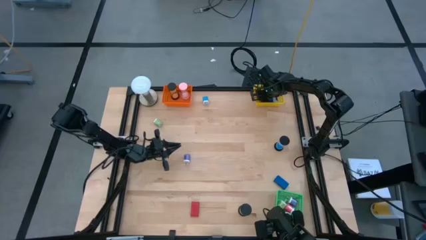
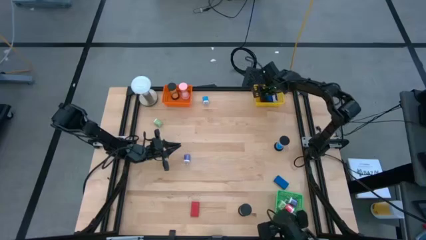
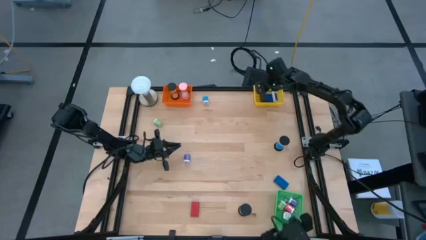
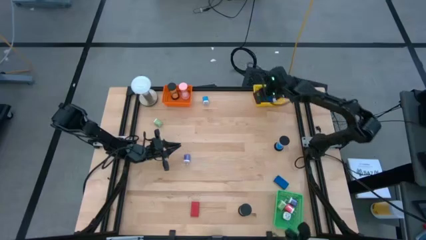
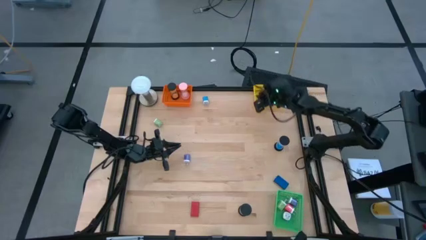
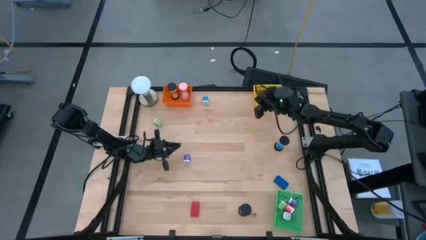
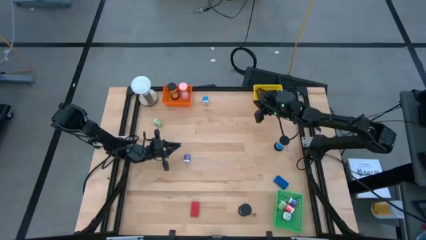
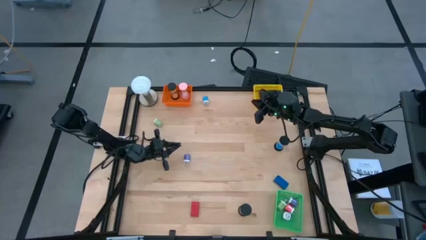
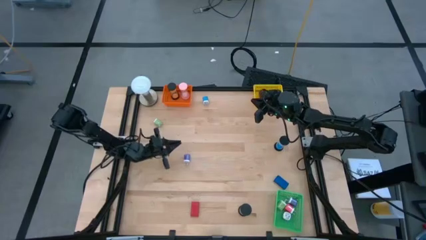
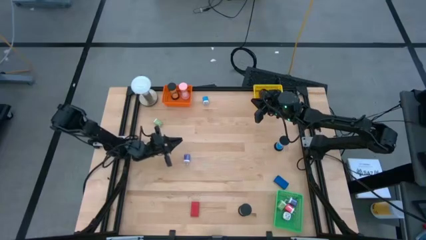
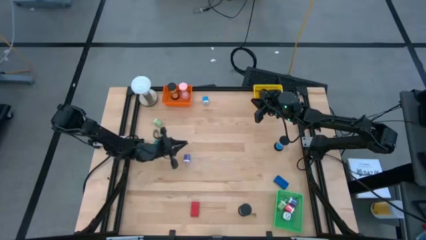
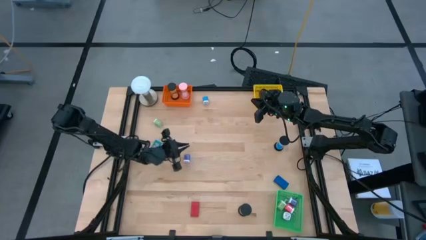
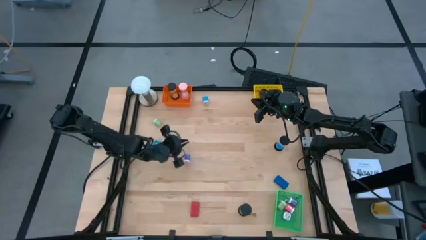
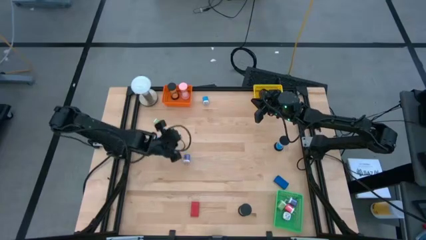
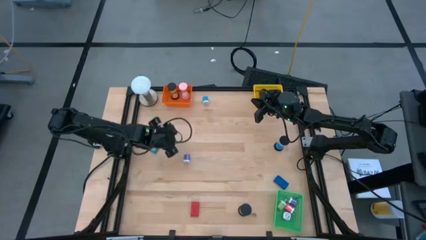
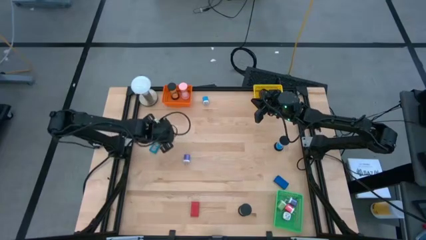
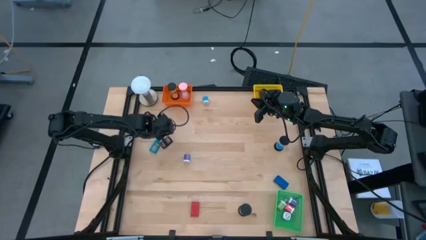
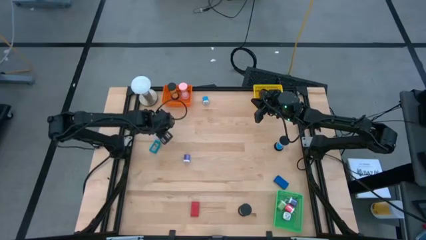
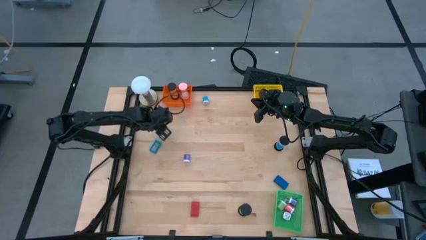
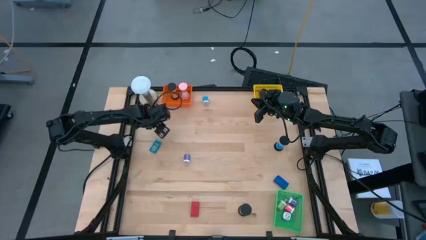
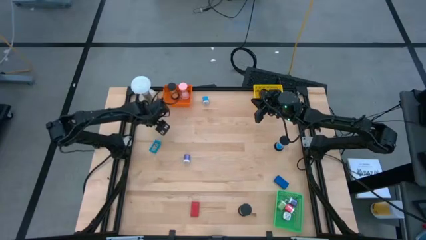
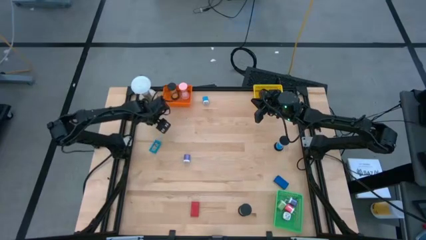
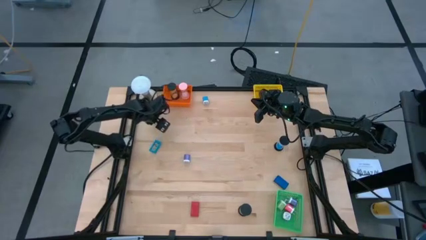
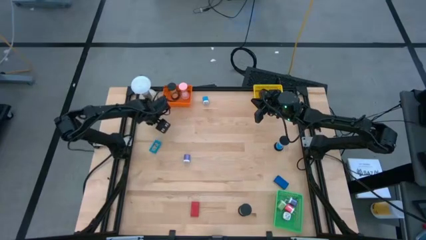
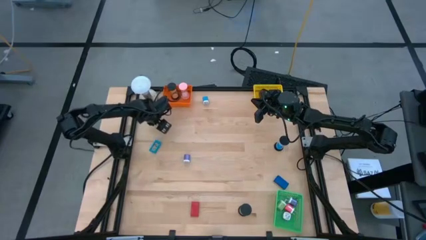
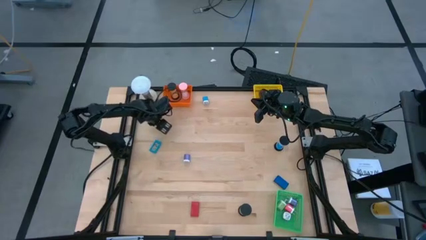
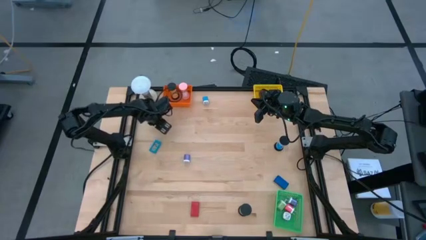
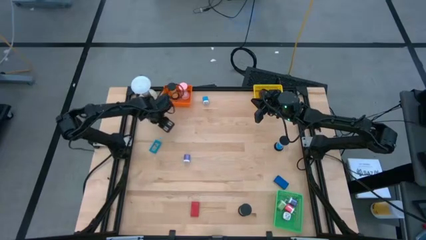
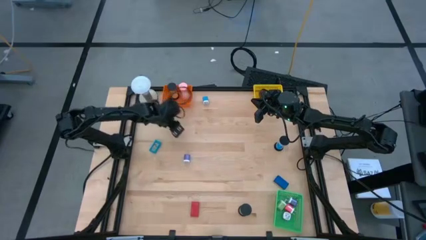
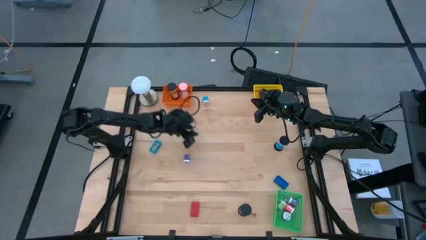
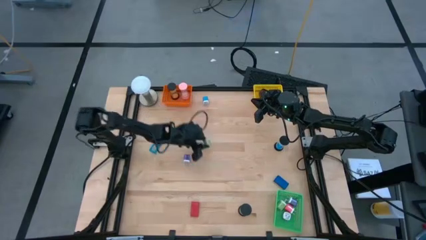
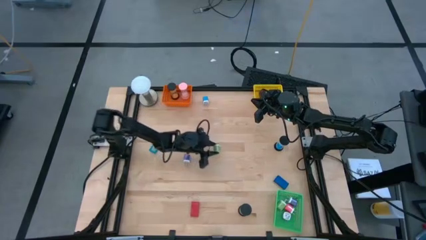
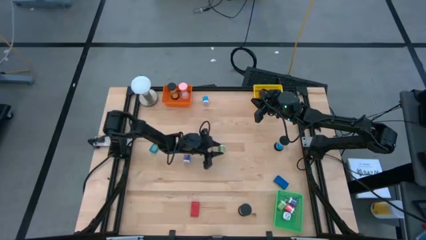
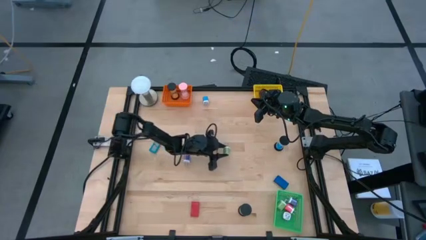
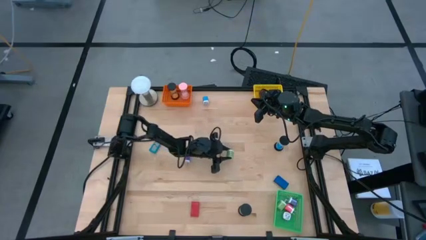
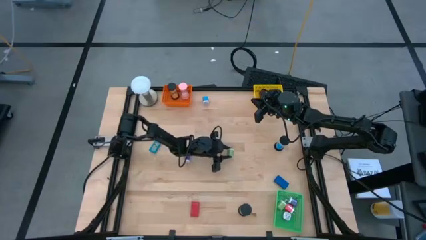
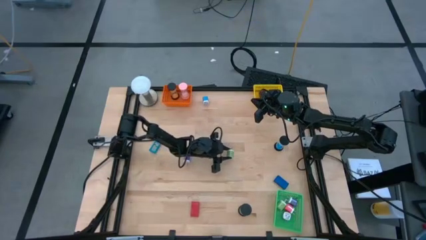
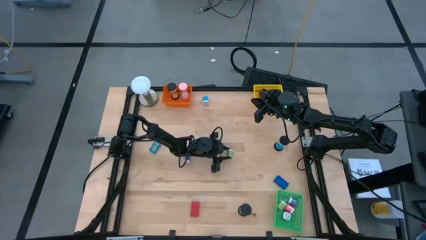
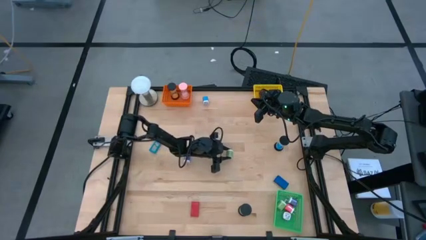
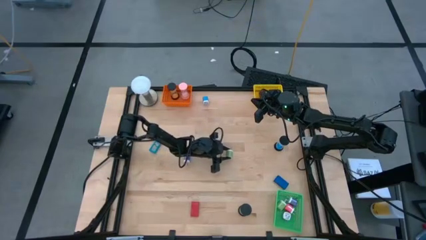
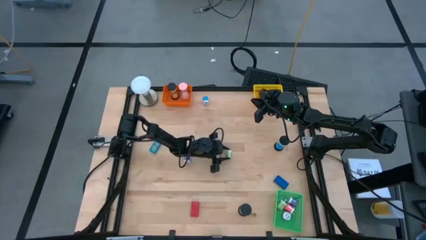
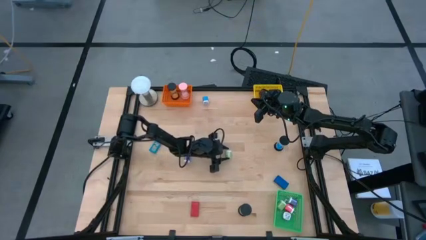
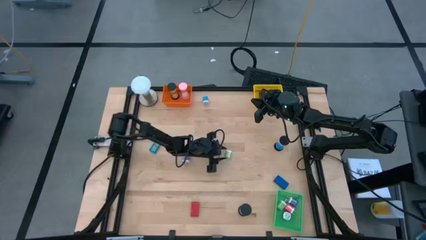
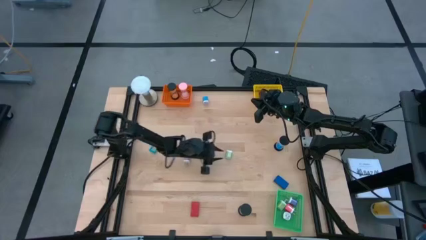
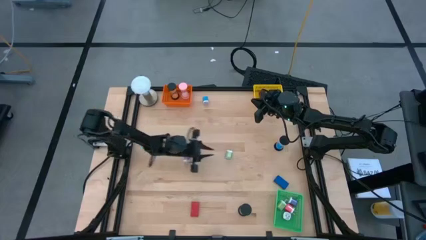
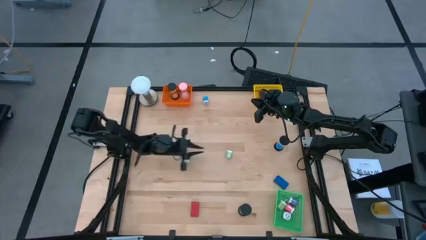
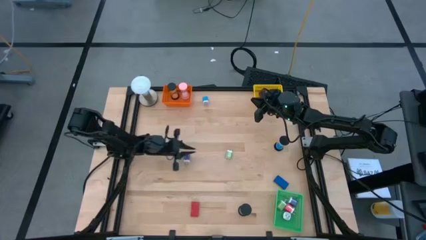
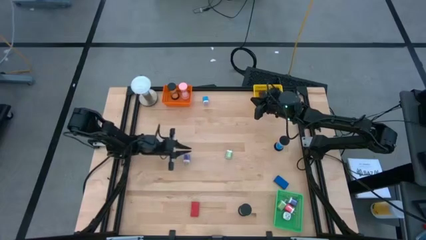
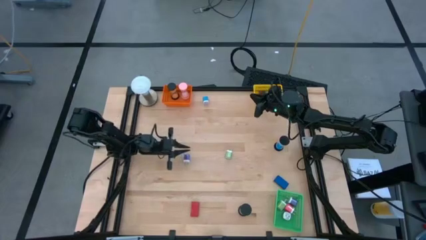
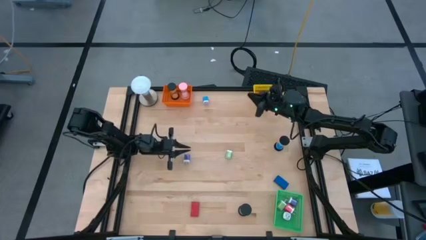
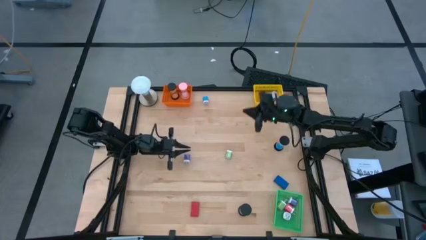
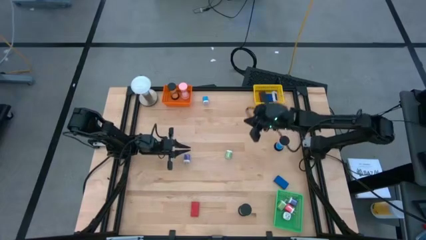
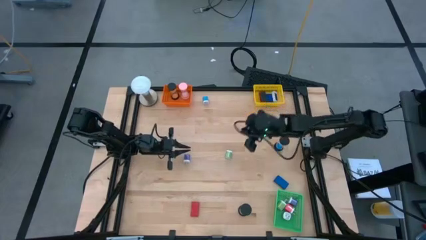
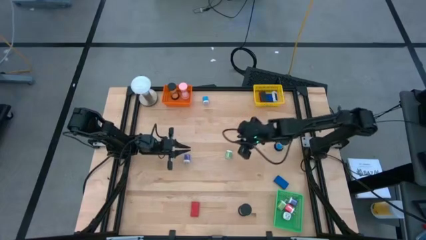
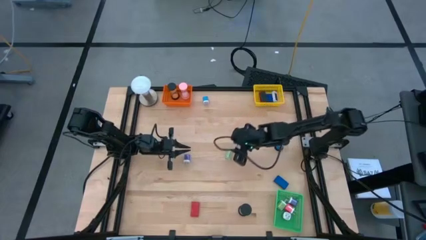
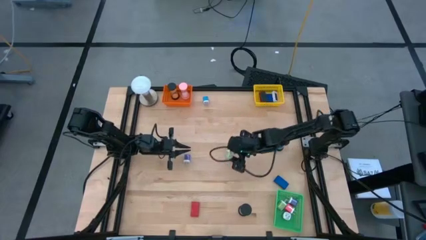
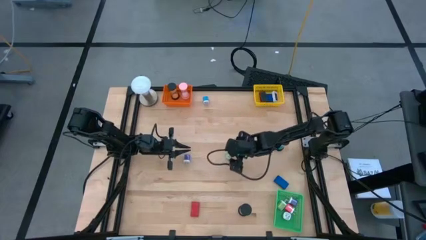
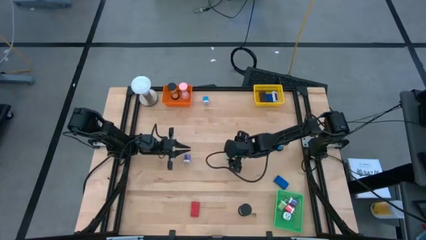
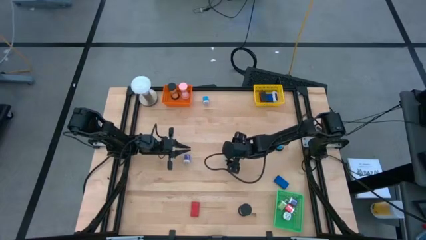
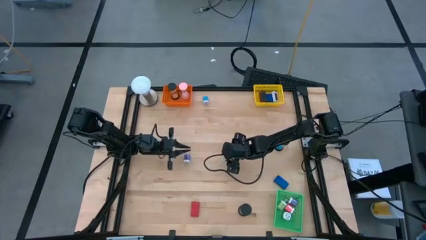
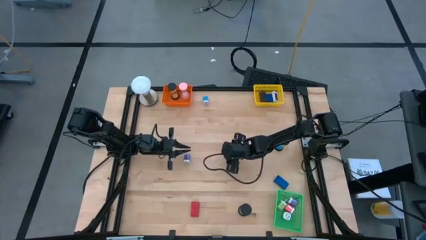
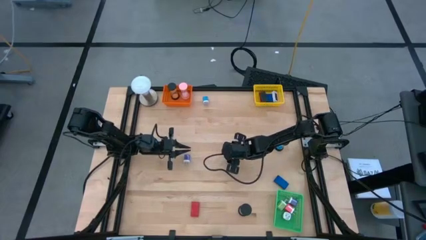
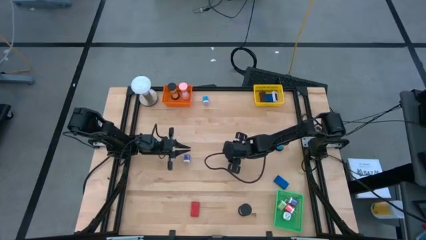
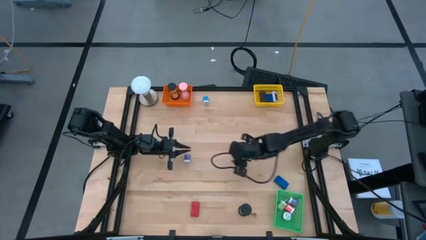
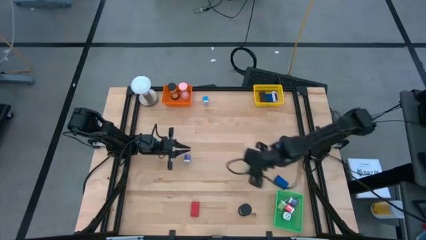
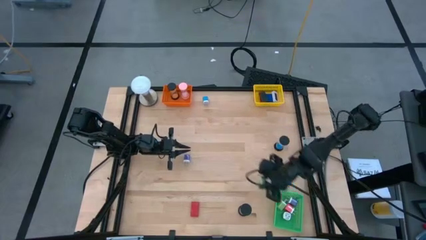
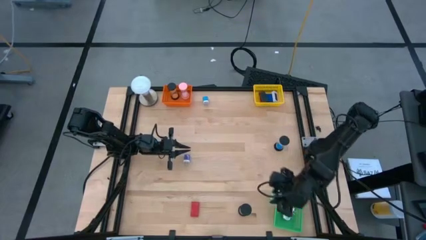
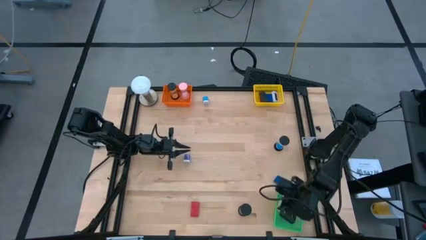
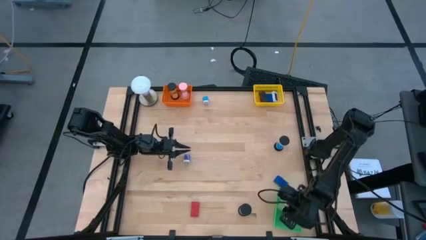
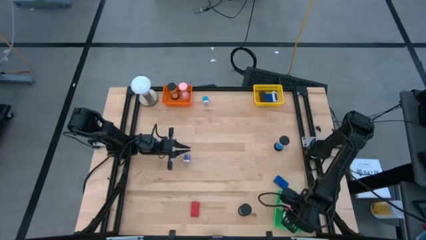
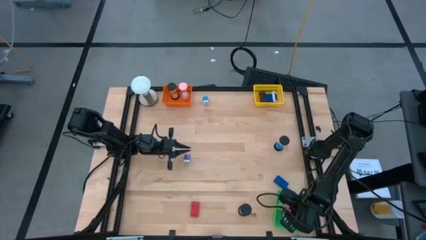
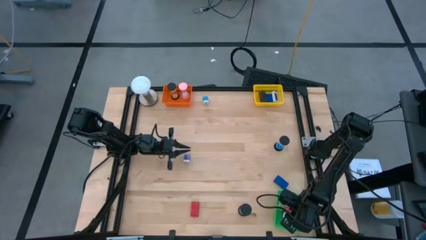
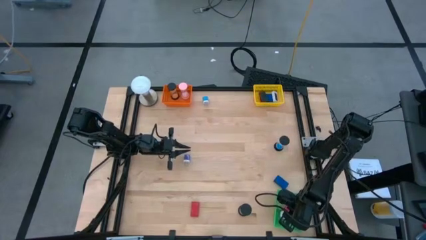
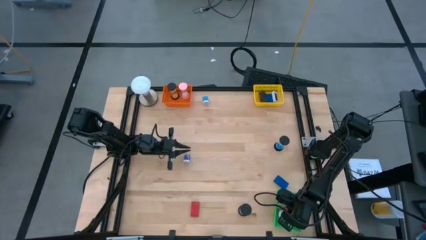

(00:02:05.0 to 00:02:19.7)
Task: Pick & Place Office items
Put the green charger adapter into the green basket

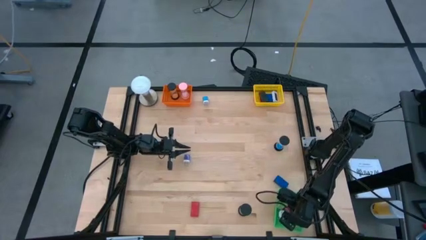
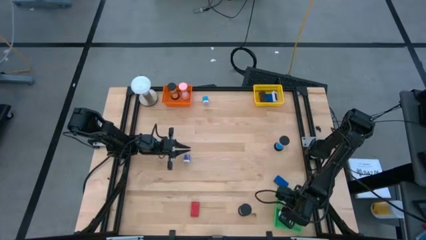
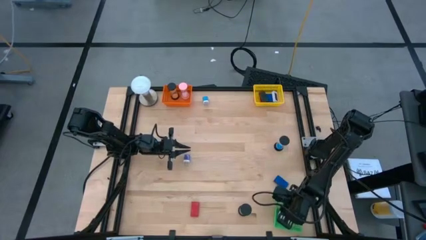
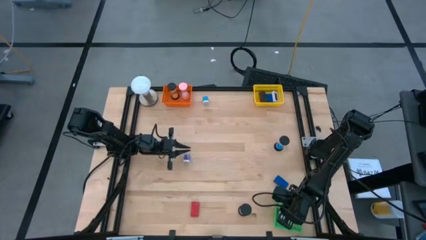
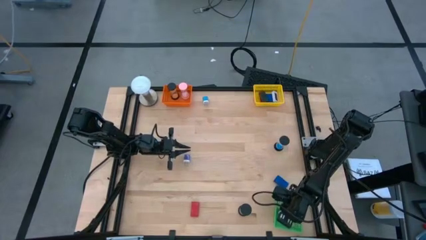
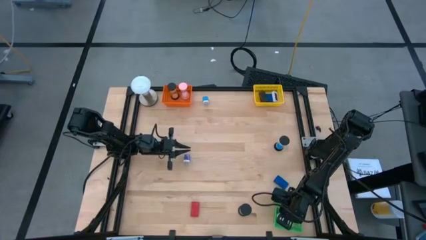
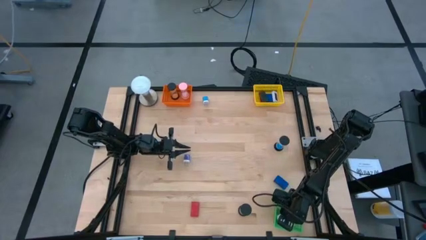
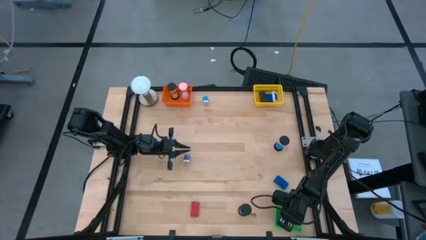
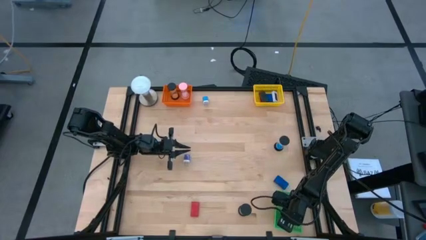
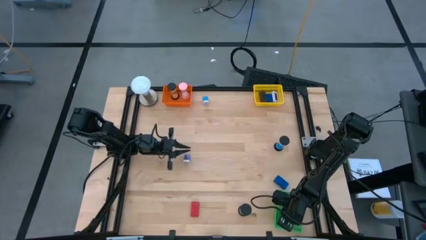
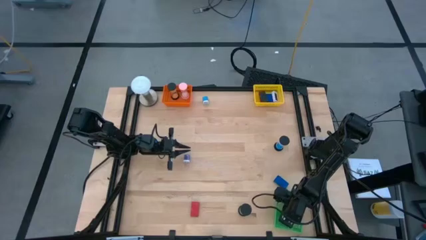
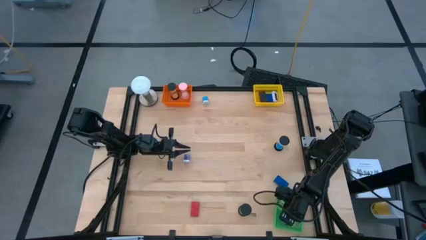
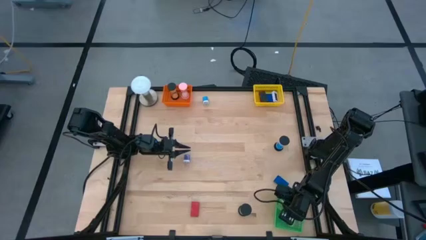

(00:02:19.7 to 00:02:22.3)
Adjust the purple charger adapter

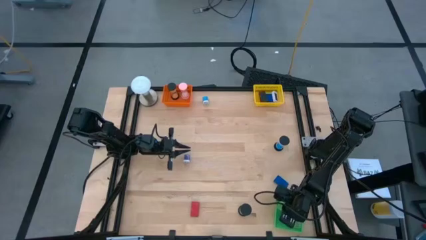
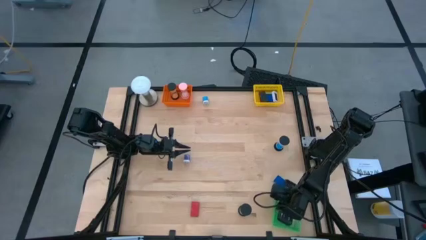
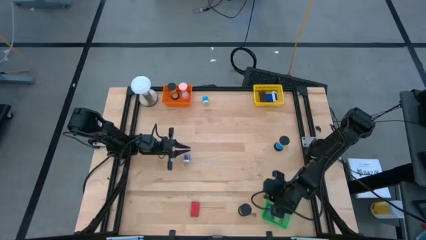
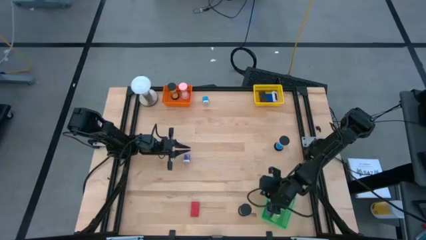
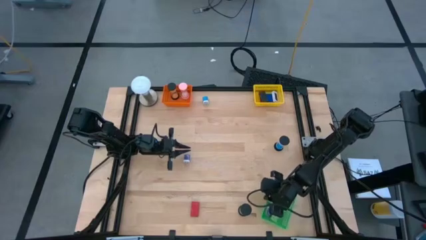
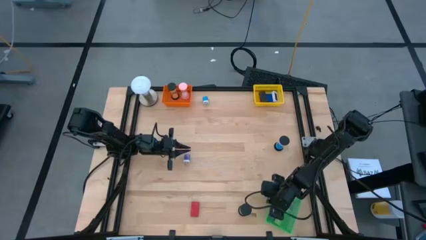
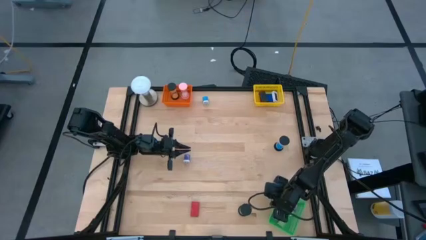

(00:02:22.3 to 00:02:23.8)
Adjust the green bin
